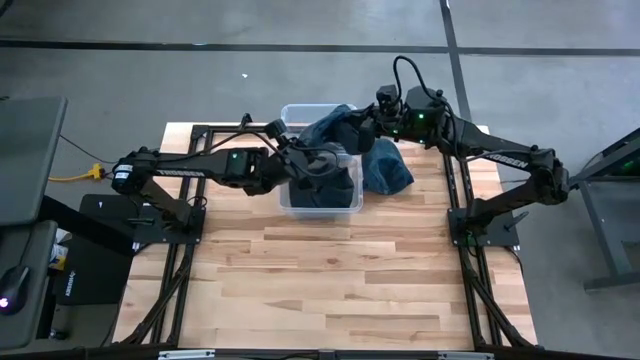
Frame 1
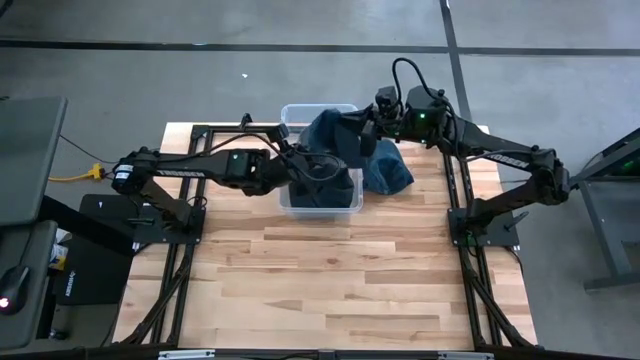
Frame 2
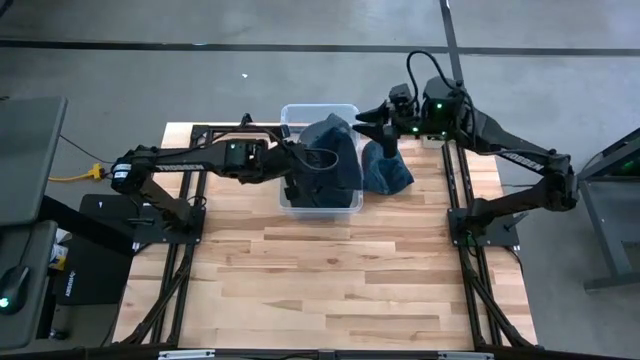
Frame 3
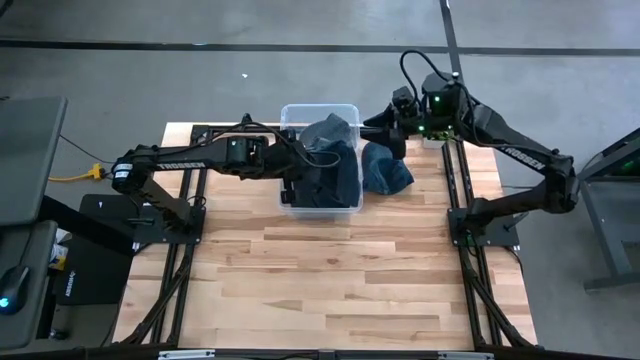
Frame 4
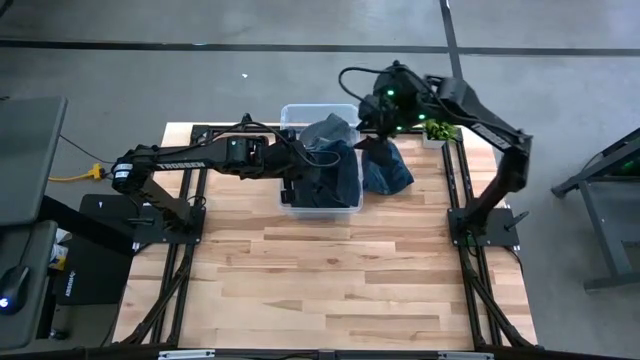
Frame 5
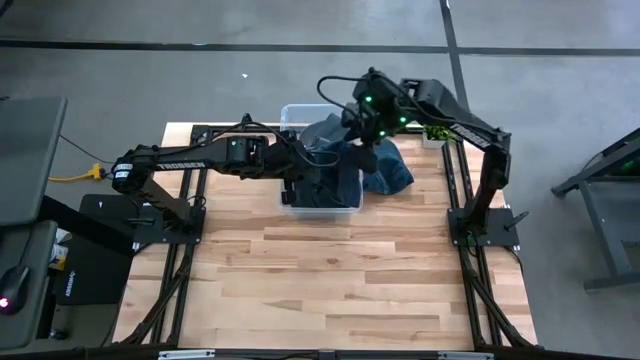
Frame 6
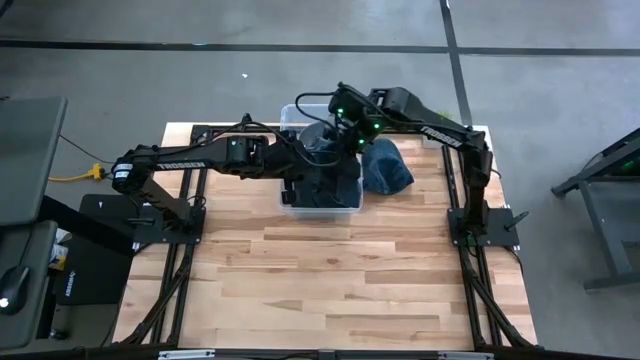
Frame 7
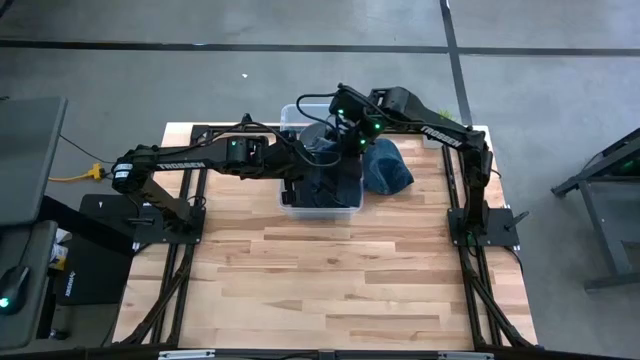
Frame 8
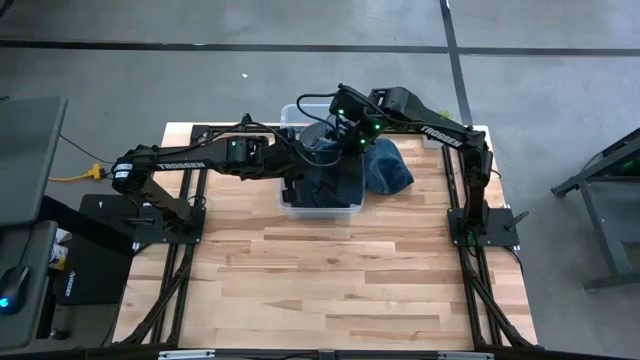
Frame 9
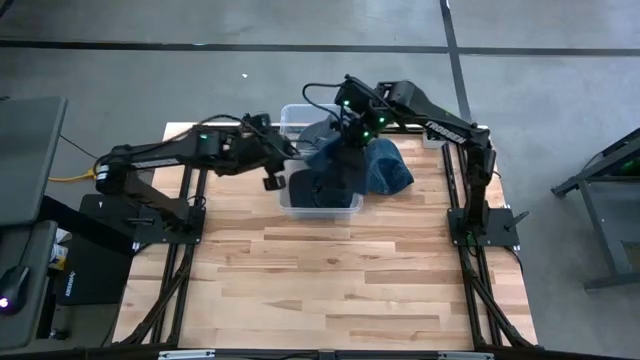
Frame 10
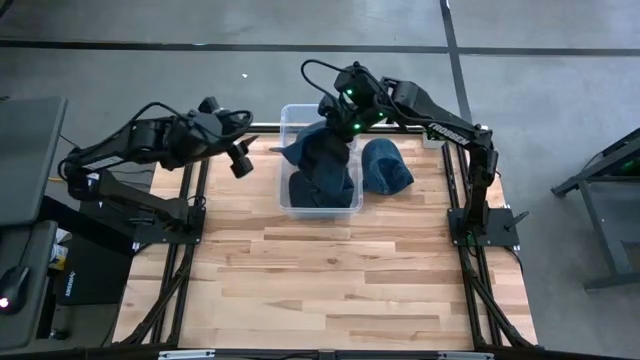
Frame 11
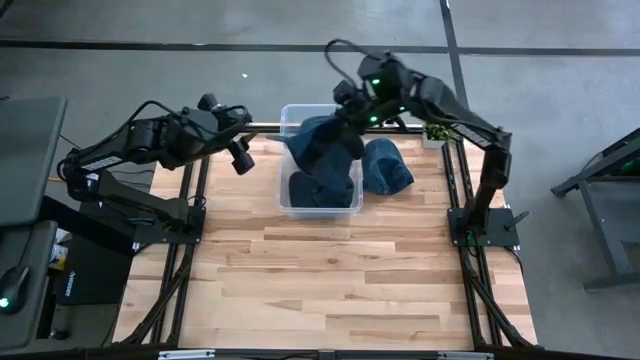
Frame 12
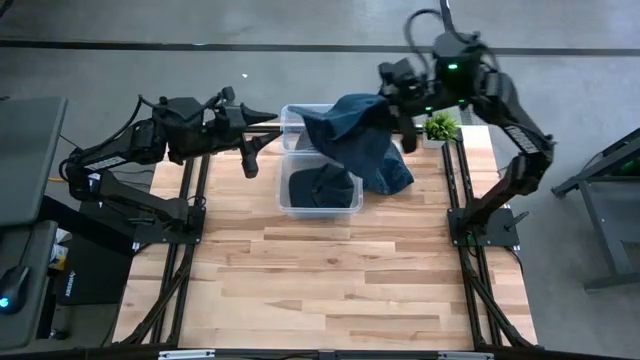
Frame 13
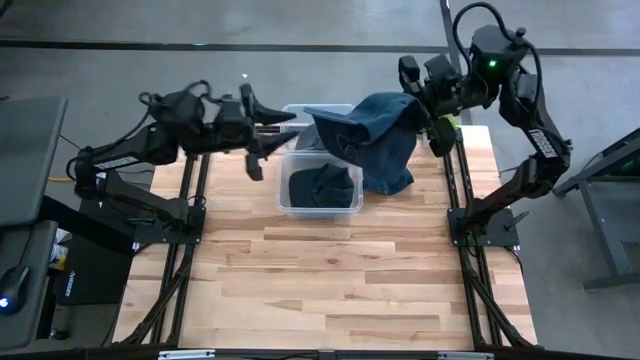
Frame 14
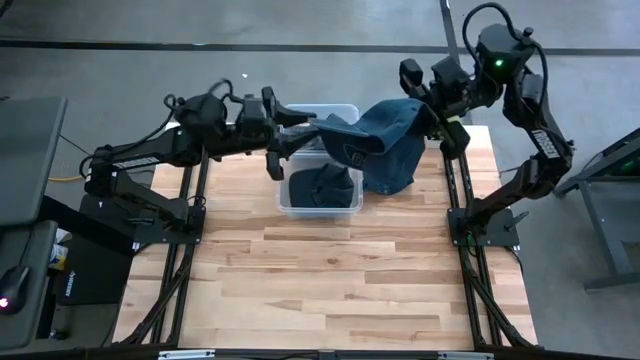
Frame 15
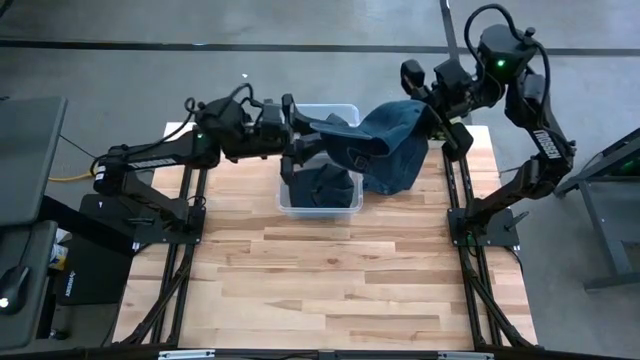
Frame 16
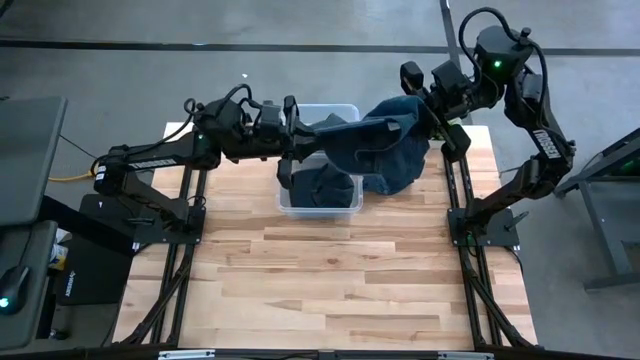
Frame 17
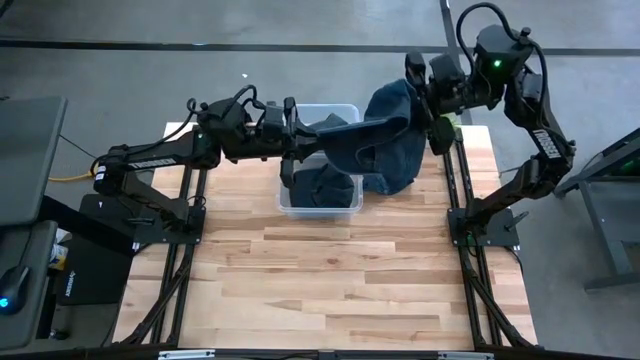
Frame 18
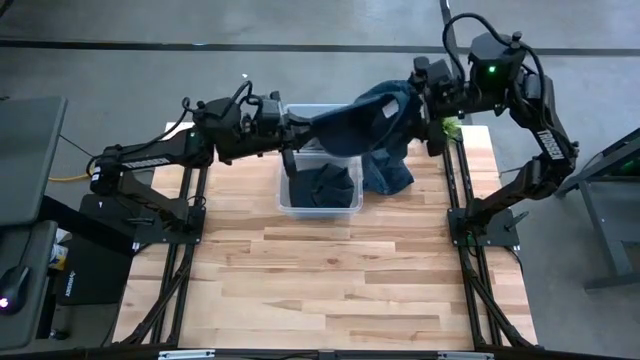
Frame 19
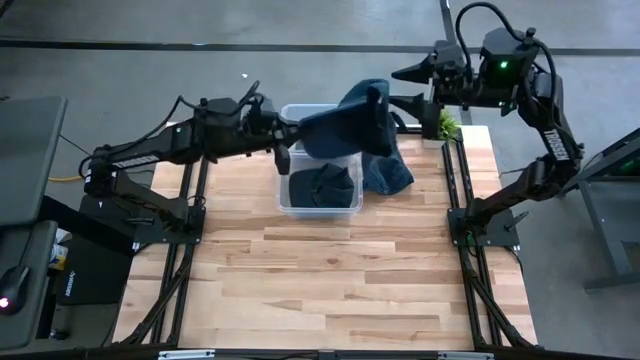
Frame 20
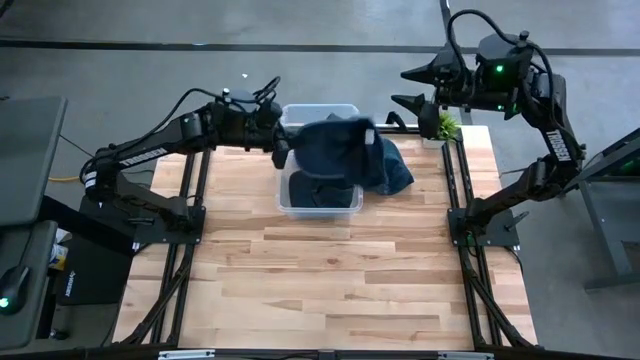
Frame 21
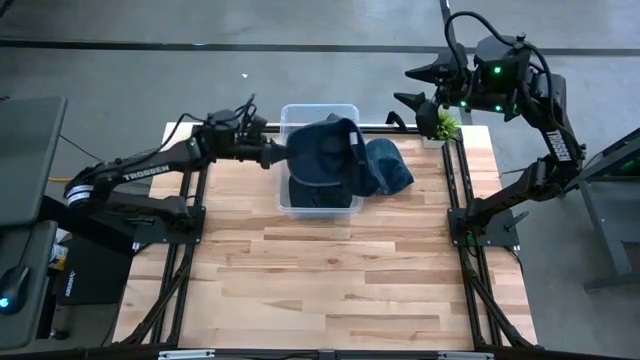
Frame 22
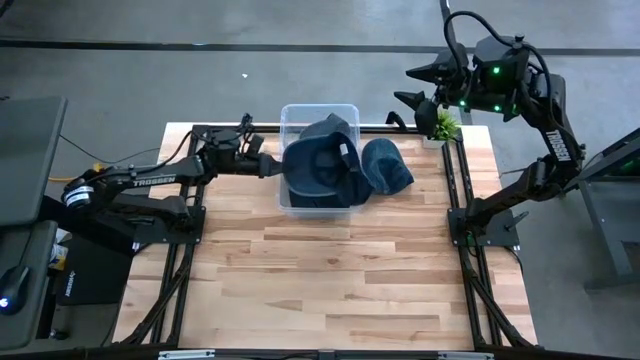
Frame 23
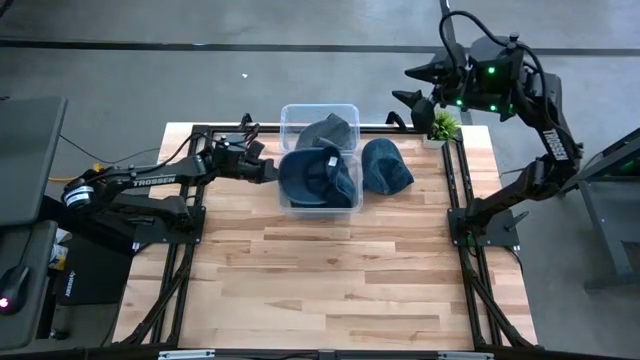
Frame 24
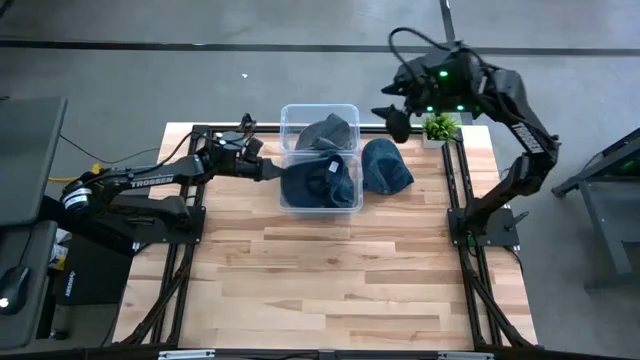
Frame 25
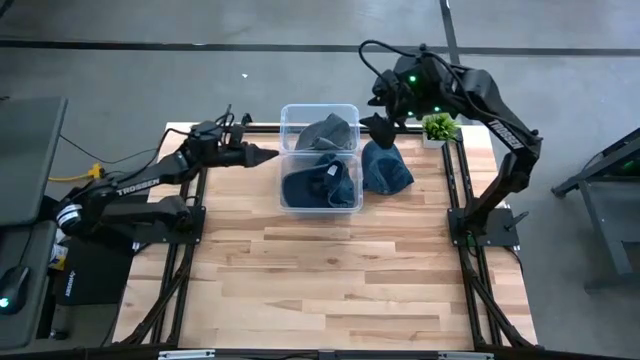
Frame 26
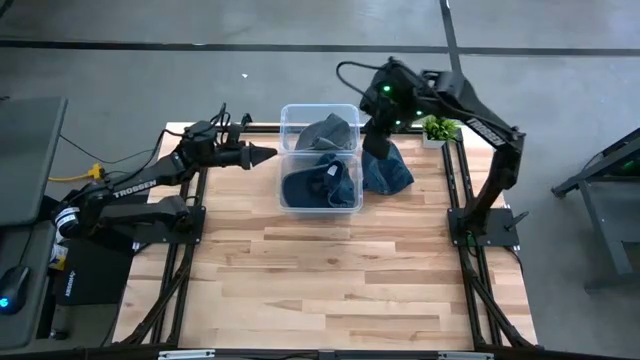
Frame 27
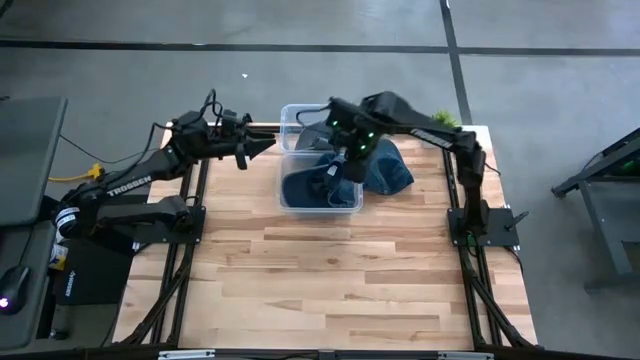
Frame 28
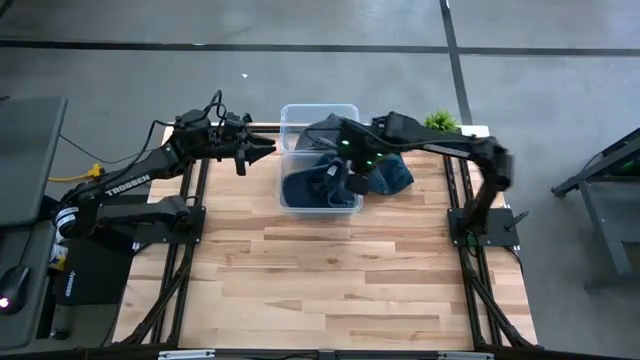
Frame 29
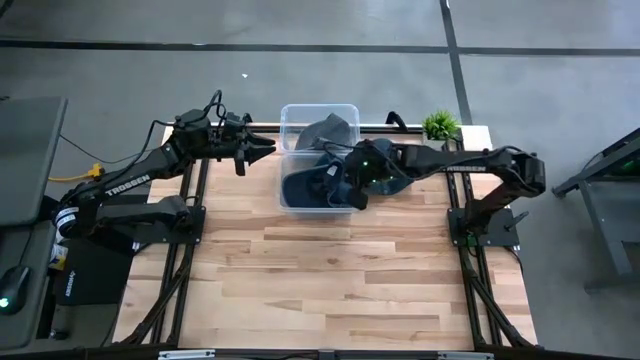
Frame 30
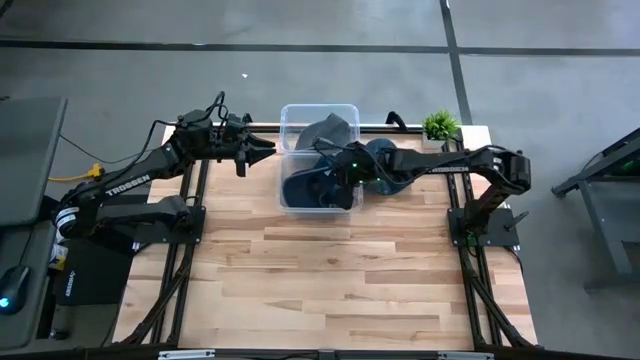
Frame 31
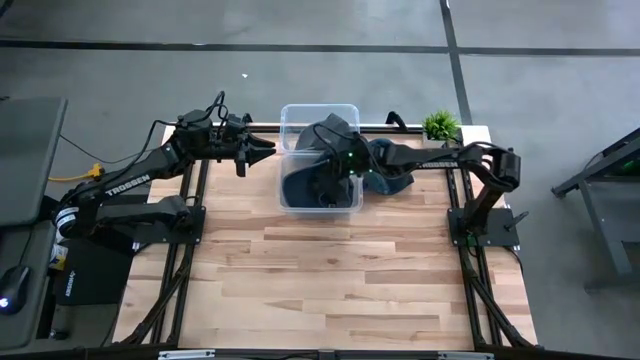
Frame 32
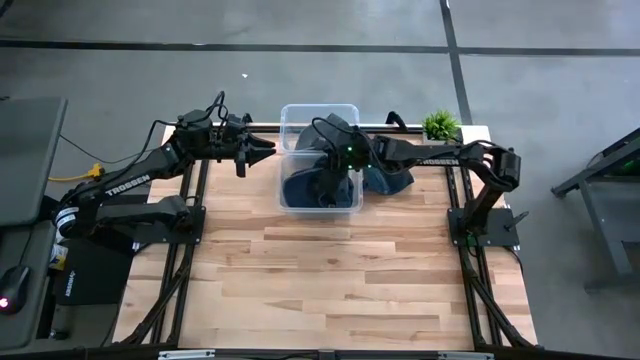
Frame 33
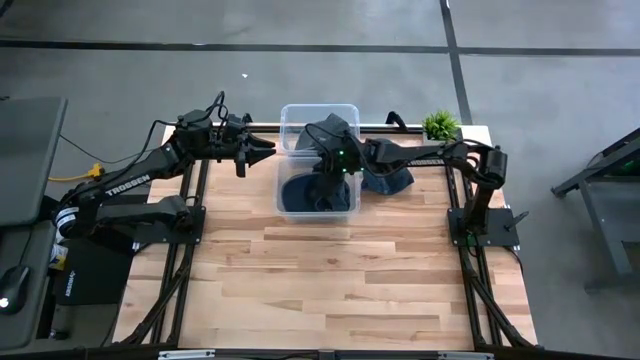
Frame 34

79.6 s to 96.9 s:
Task: Pick & Place hat
Put the bottom dark blue cap into the bottom transparent bin

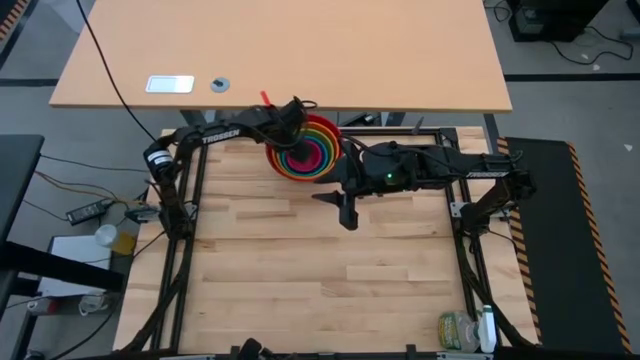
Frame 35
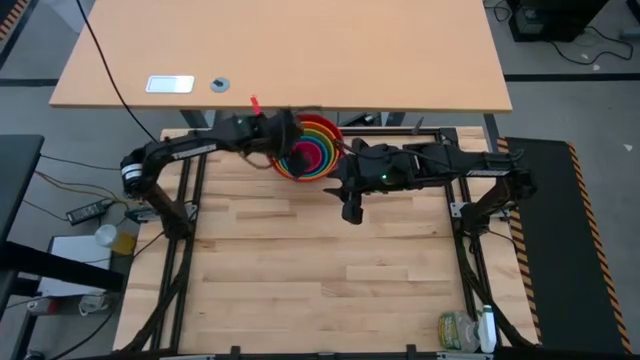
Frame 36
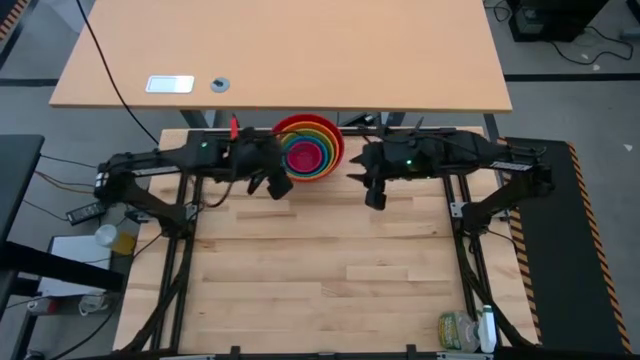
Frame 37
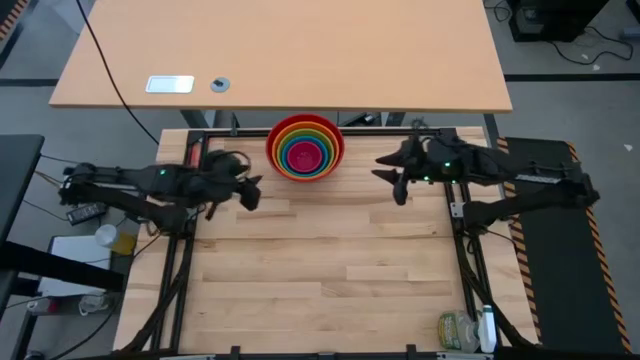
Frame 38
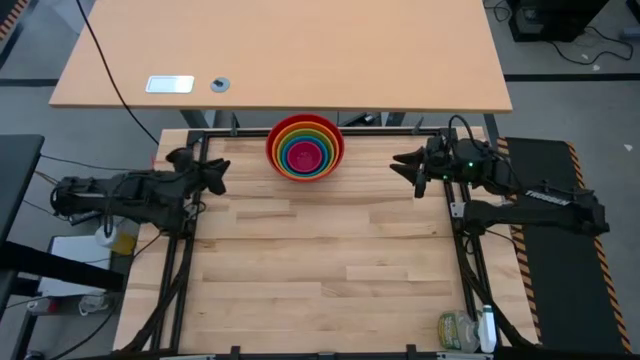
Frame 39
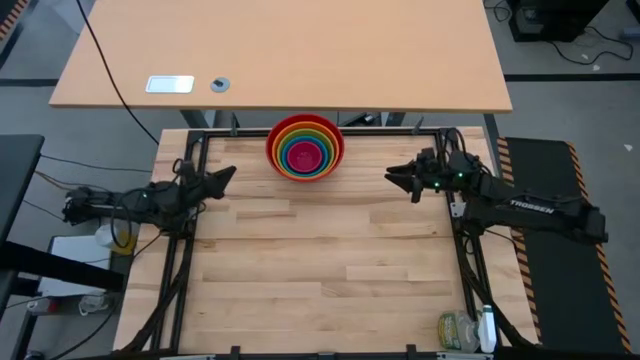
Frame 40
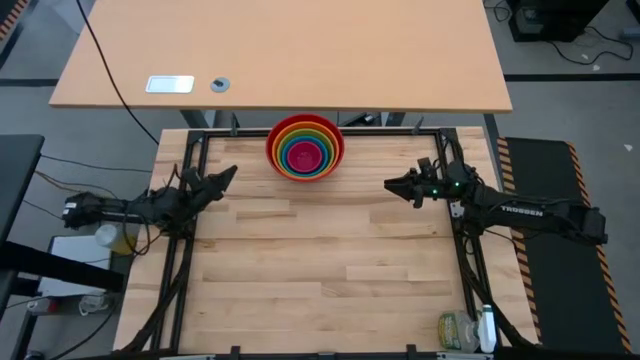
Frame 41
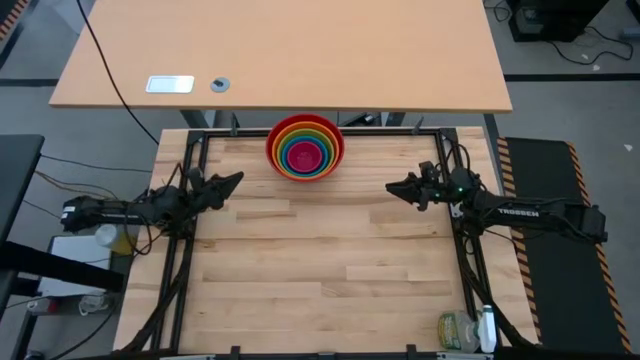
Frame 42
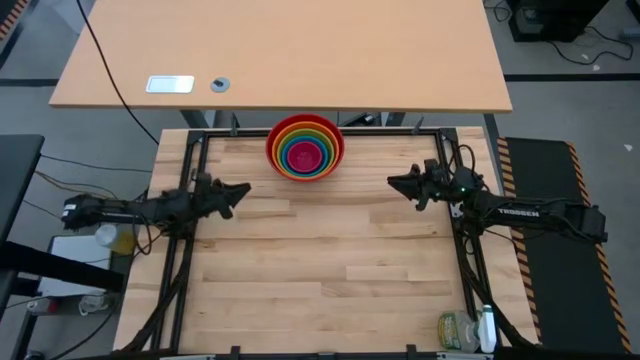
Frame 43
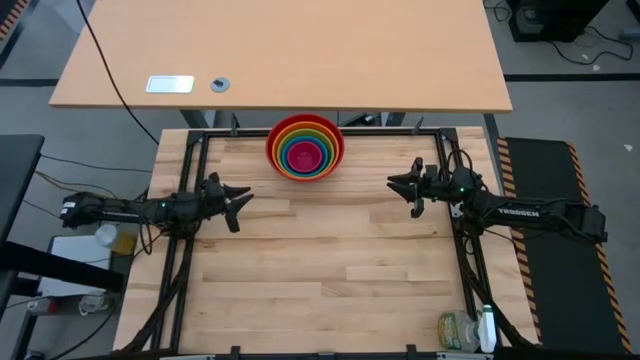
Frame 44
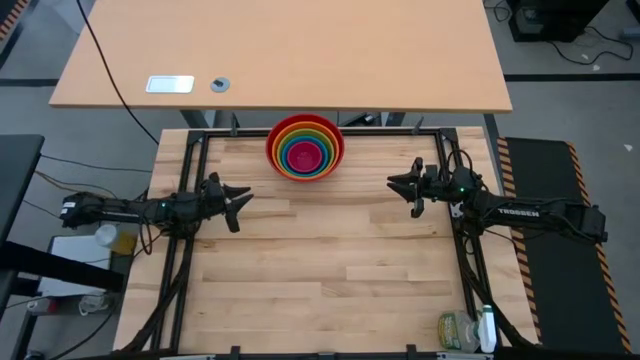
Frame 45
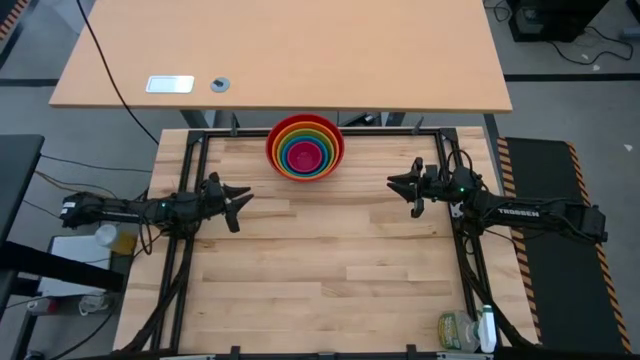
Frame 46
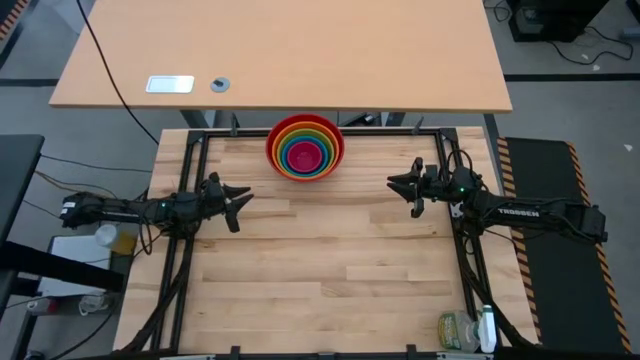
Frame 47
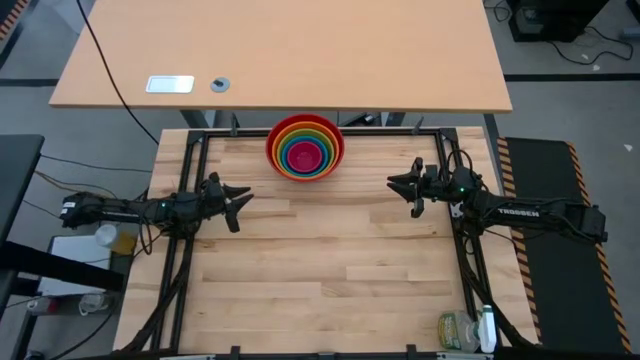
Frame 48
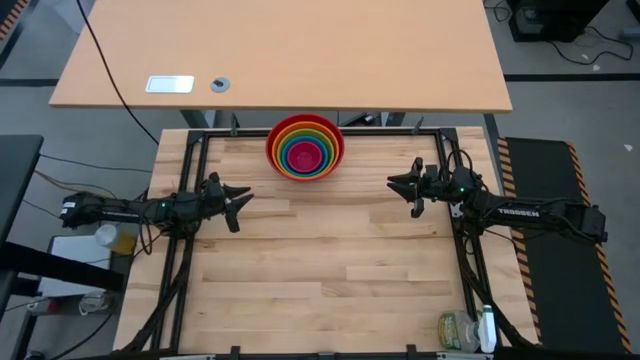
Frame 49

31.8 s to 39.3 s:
Task: Nest bowls inside each other by size order
Return to Home Position
